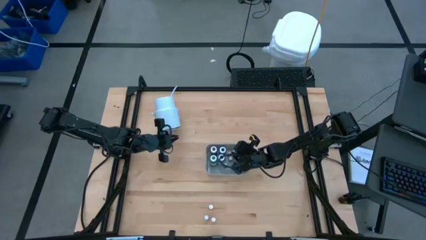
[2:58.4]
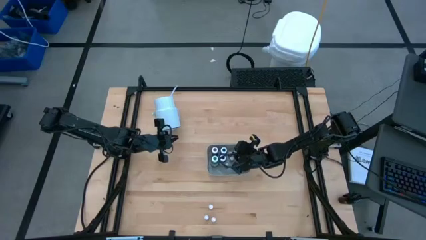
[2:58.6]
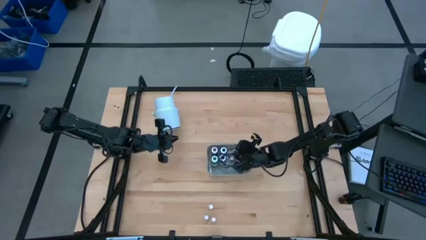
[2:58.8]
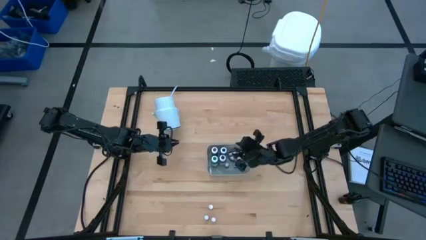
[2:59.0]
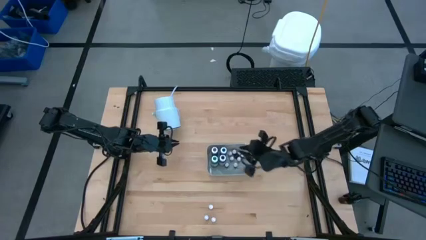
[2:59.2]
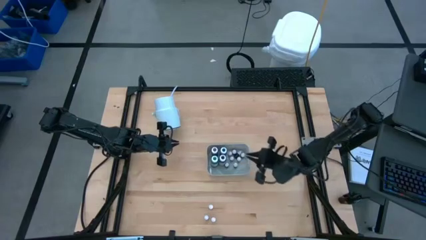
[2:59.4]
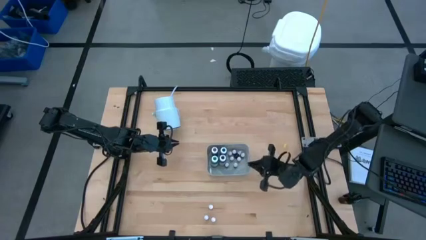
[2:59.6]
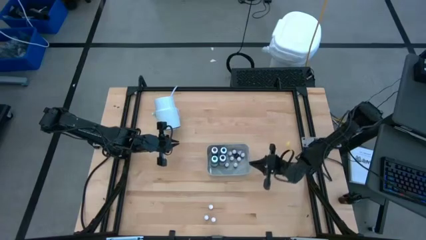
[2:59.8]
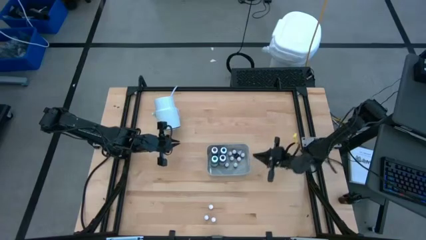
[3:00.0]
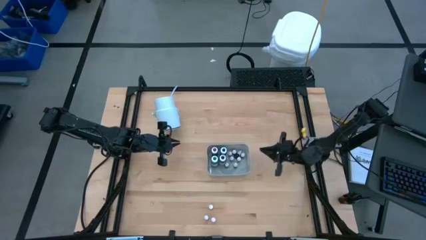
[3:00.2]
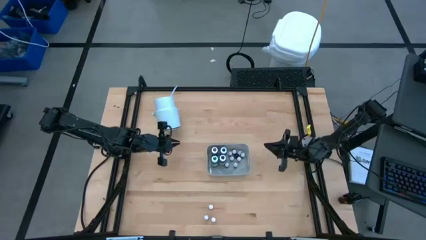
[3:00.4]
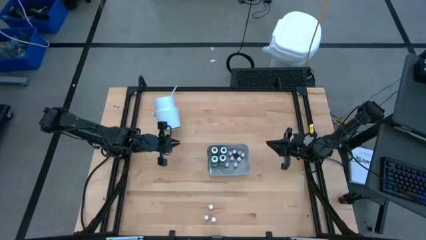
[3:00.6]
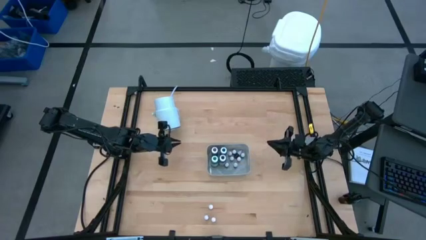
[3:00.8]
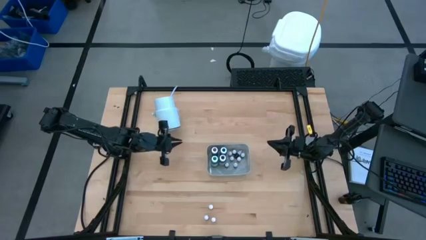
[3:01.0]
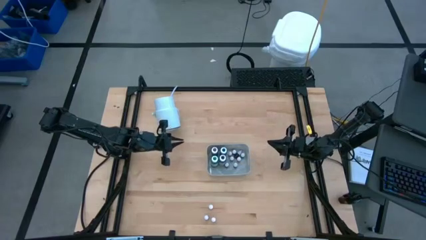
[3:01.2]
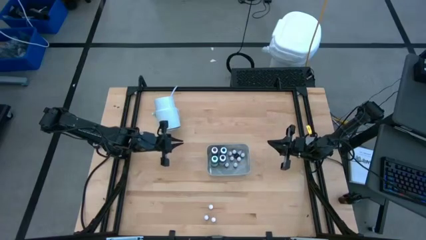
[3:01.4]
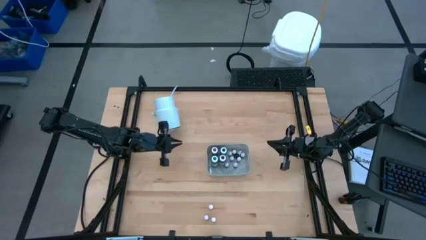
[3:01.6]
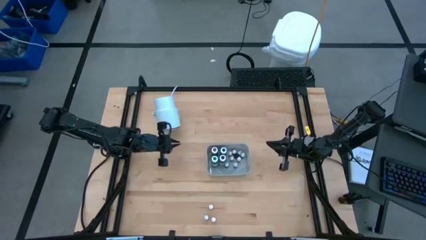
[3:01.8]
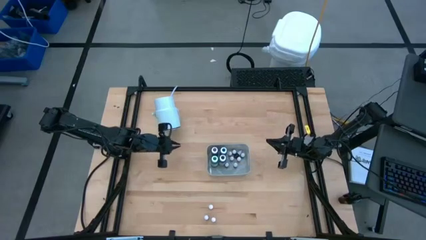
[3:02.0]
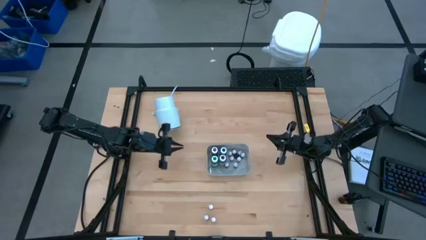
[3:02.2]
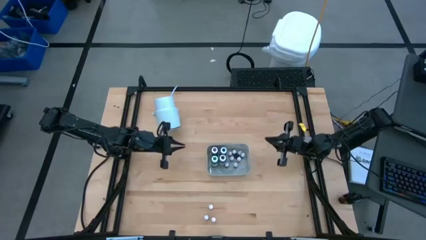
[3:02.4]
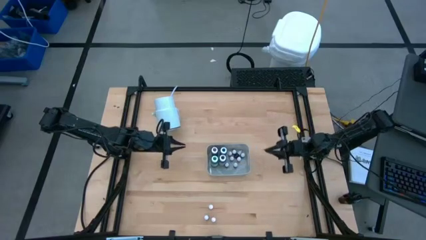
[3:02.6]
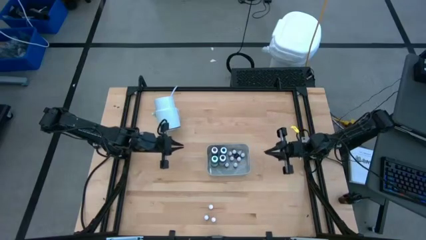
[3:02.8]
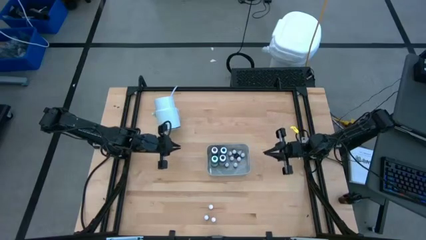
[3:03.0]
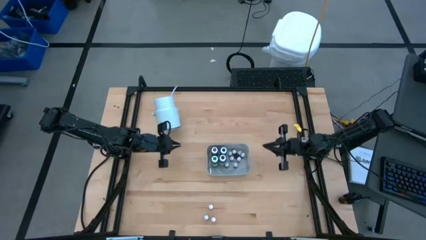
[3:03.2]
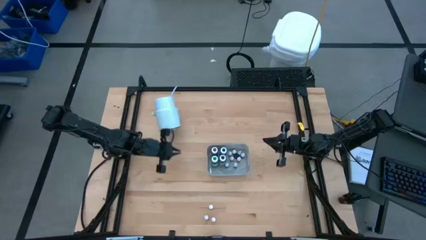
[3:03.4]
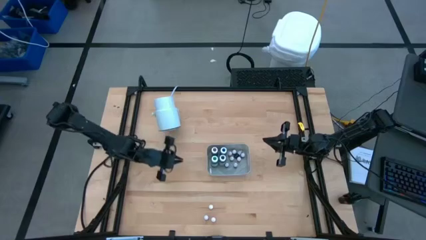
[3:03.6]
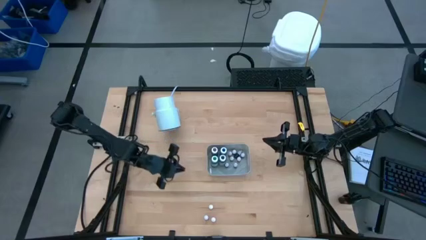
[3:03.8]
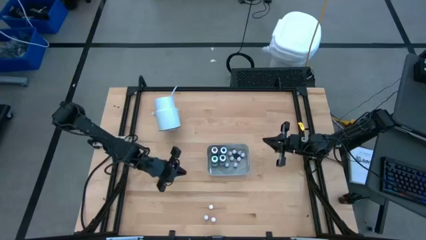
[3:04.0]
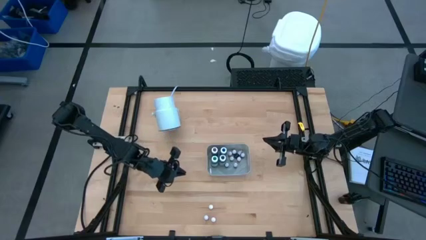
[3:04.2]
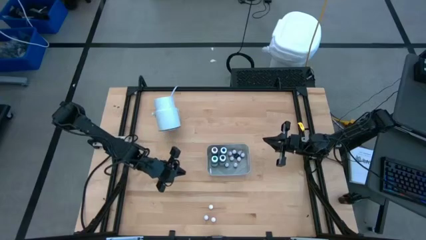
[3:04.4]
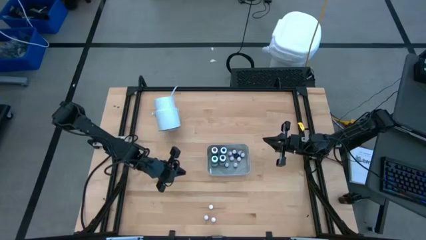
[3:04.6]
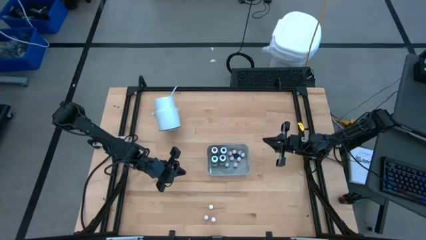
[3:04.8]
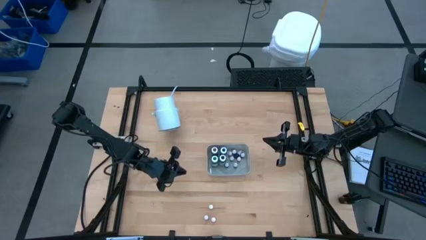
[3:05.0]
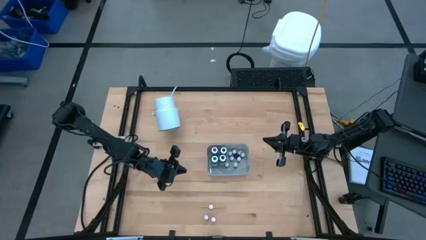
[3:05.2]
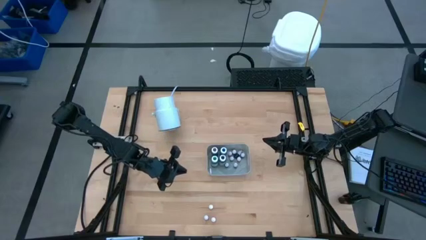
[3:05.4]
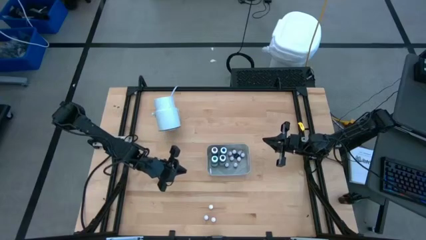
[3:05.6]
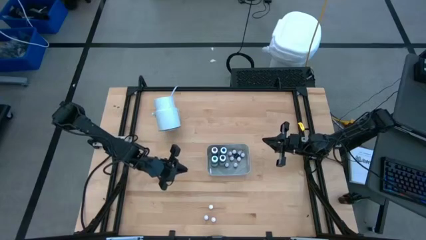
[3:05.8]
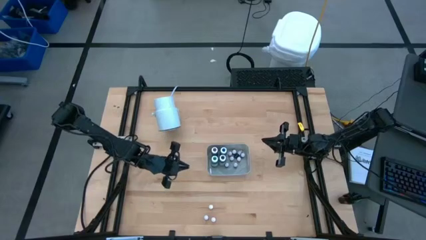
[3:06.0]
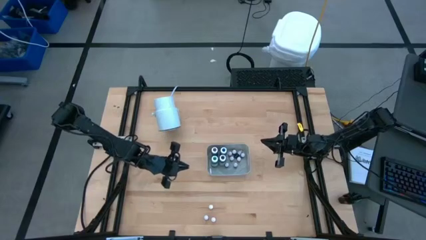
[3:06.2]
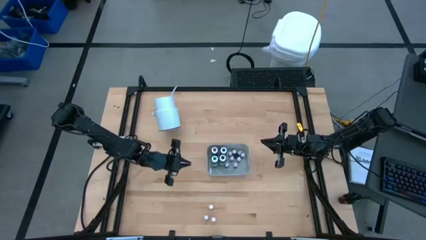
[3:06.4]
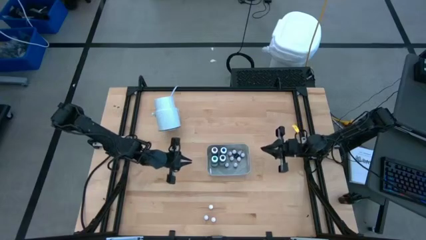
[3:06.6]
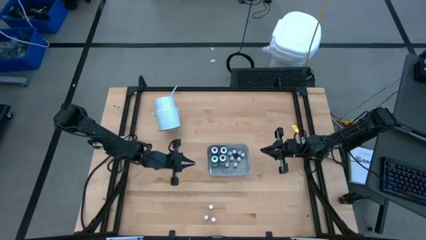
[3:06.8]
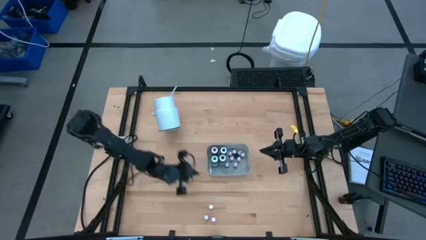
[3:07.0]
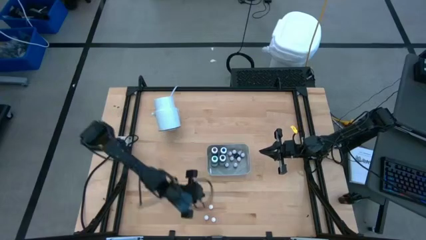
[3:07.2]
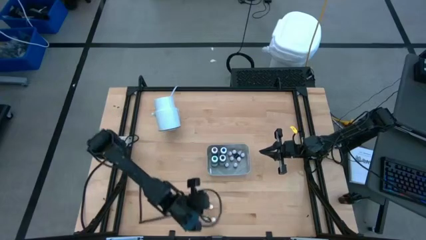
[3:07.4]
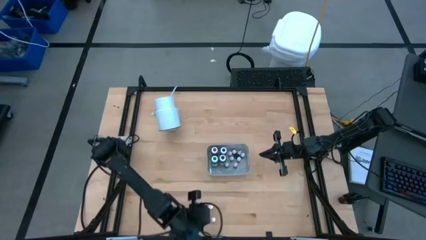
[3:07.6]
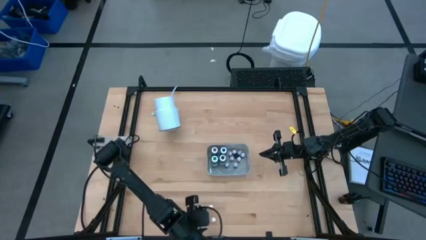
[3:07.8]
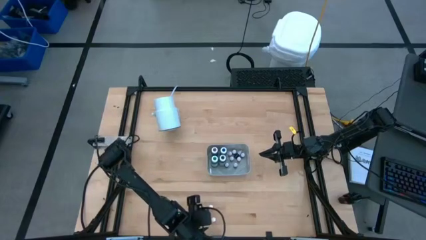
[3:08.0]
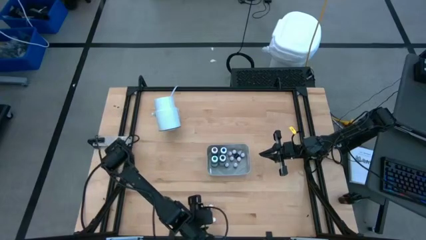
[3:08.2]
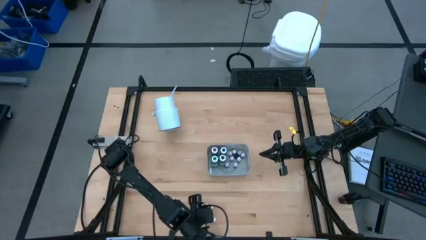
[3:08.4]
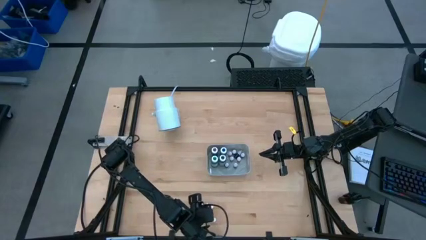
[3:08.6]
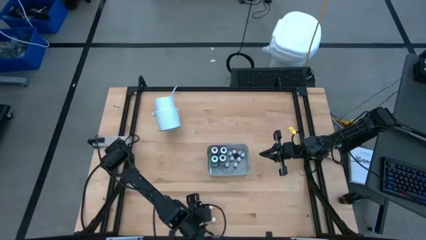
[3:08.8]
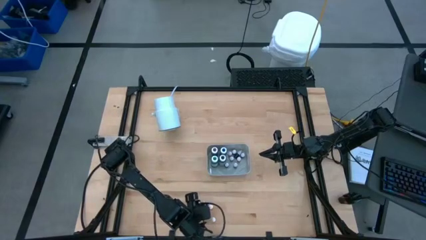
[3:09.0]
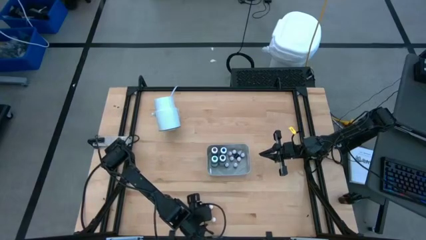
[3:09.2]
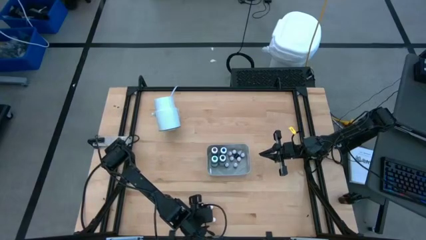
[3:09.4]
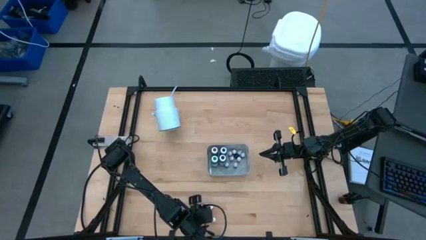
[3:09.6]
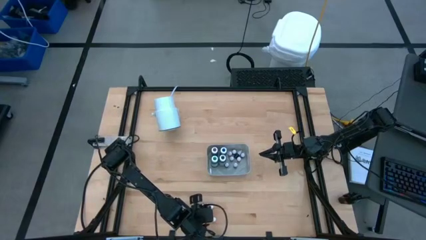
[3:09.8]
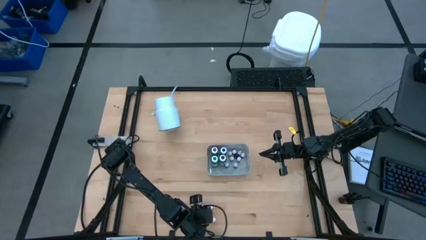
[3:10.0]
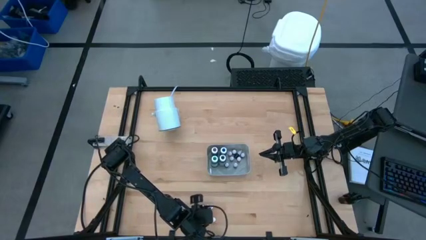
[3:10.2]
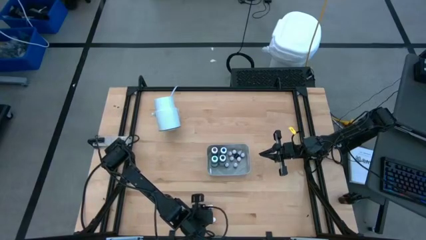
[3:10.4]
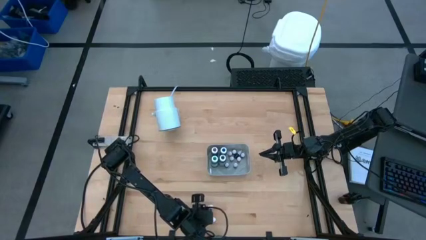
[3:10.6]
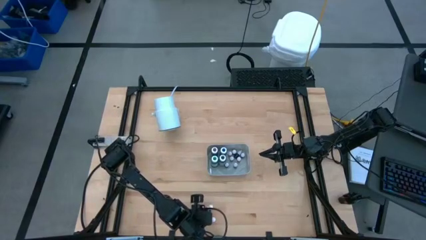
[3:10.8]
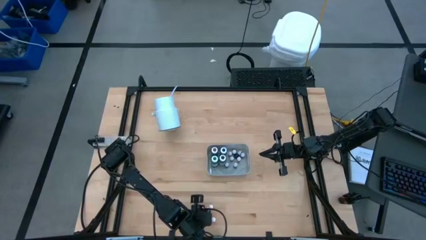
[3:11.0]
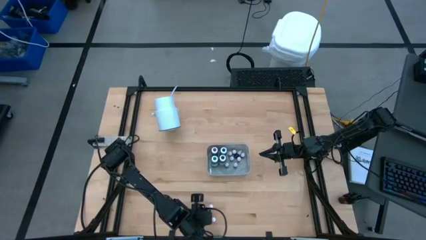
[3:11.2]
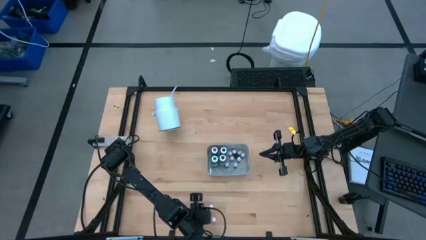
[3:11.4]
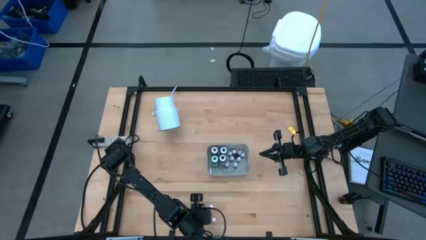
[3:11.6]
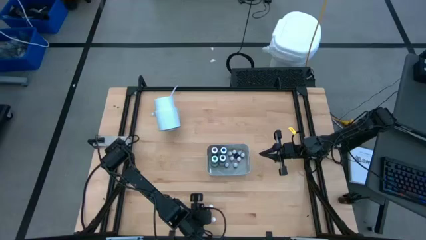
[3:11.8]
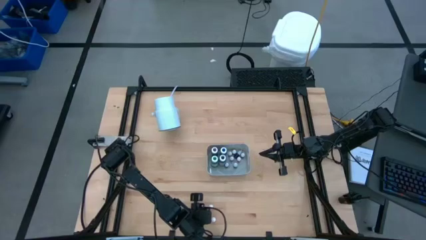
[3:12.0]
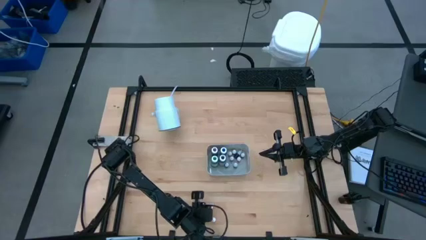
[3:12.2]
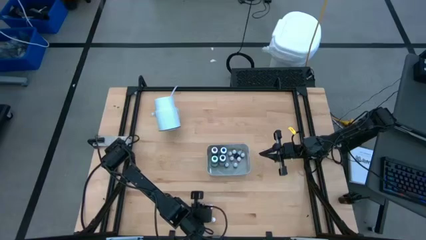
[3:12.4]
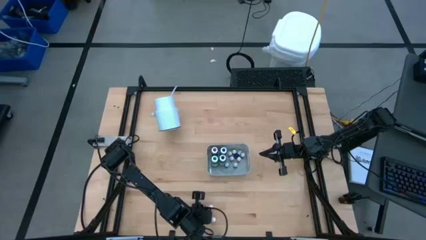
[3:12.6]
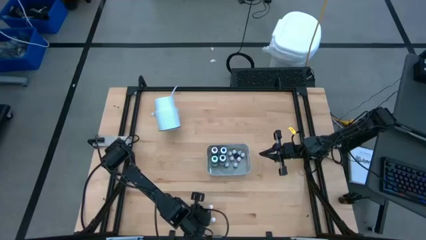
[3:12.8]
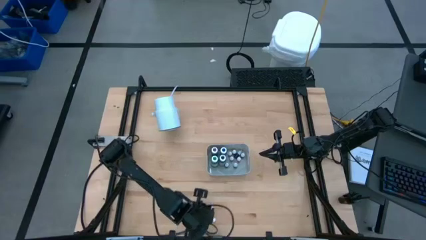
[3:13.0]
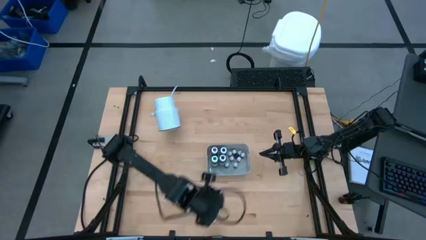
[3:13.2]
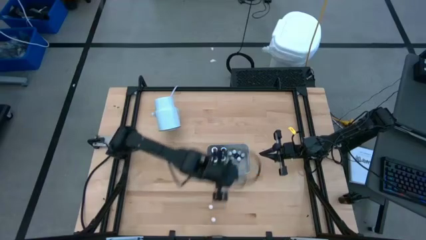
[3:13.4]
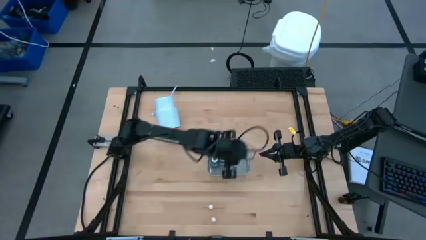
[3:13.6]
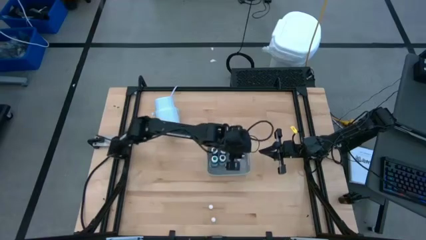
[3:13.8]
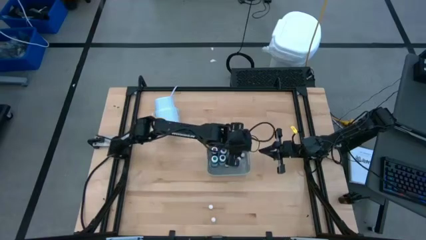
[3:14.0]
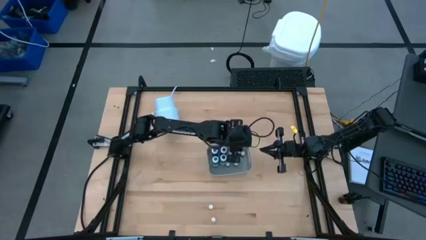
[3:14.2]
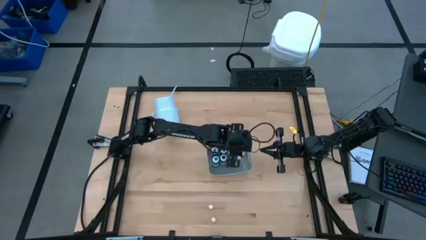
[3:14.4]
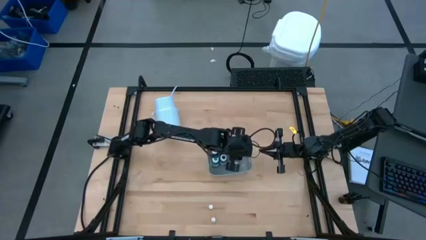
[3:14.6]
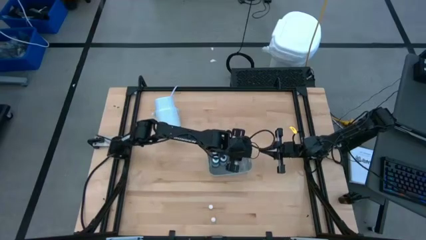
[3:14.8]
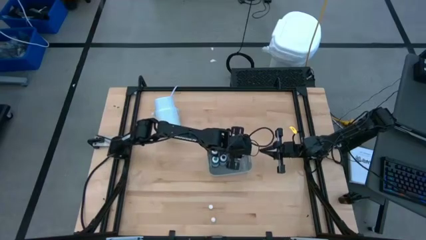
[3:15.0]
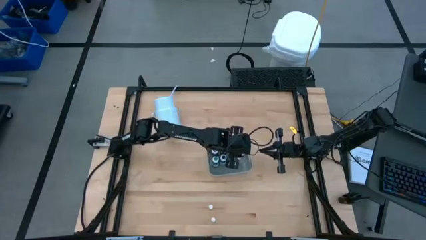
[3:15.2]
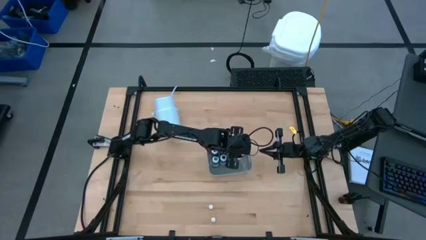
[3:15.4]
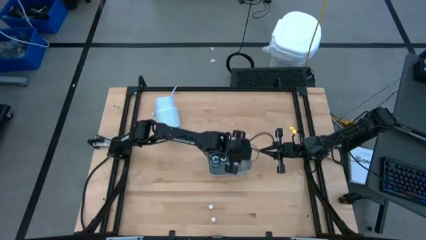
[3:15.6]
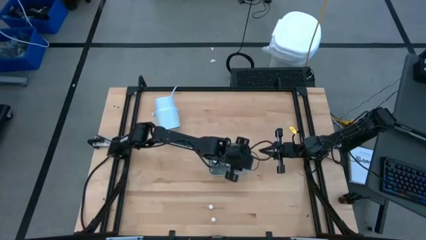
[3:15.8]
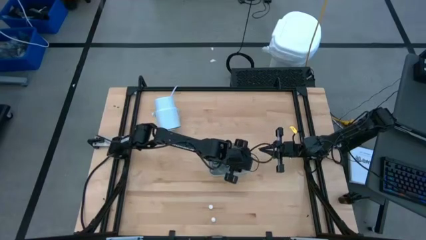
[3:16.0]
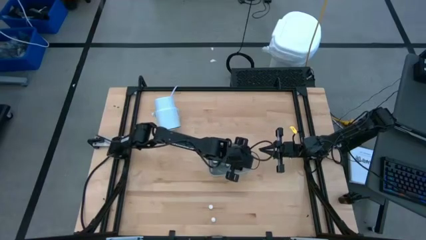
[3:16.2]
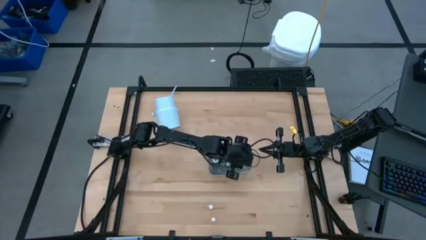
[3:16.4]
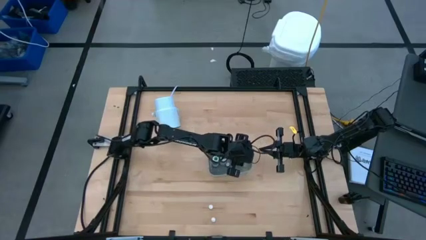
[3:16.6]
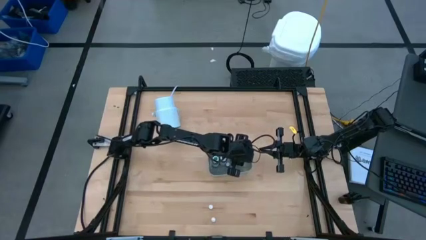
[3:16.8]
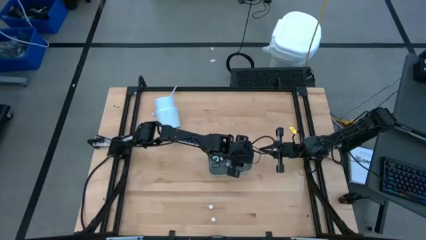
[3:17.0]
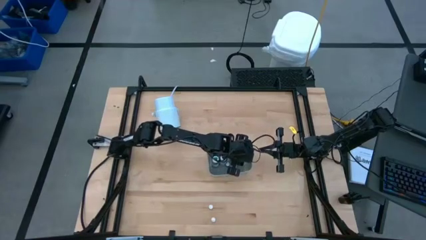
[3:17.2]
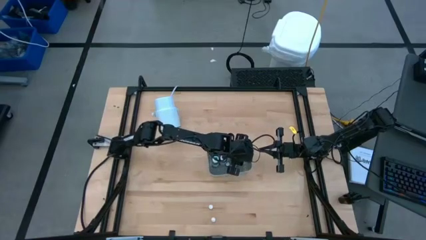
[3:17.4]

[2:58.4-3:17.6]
Task: Pick & Place food coloring
Put the small red food coloring bottle into the bin
